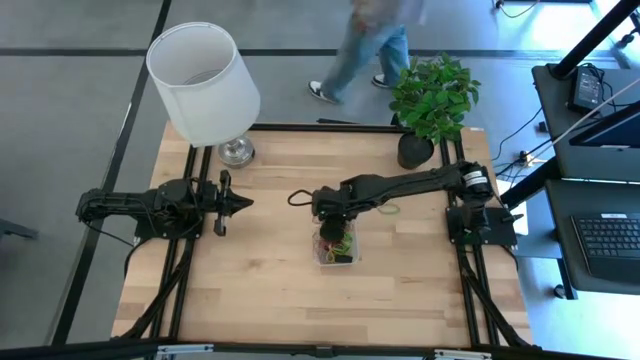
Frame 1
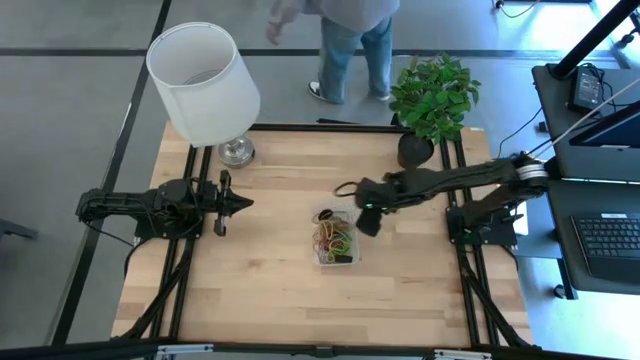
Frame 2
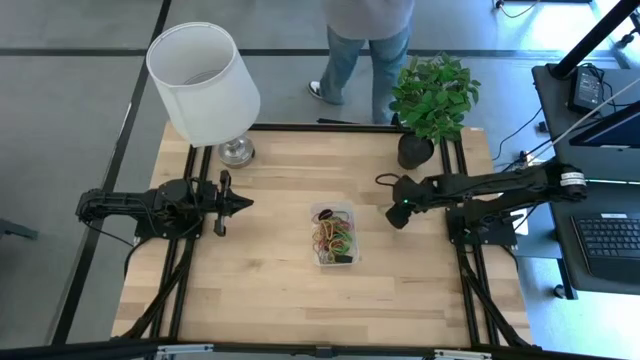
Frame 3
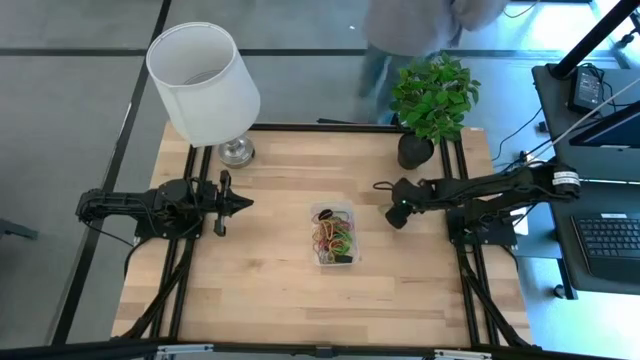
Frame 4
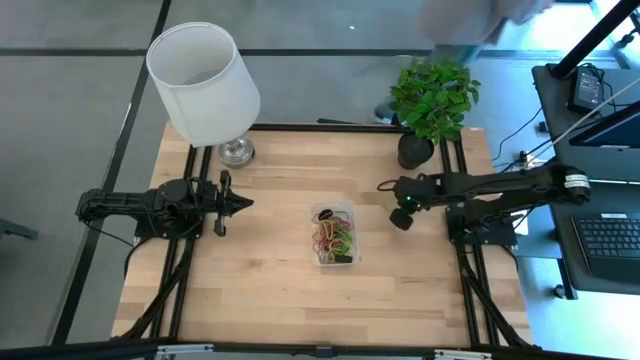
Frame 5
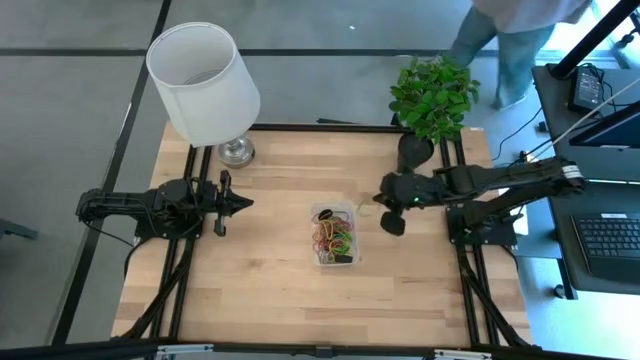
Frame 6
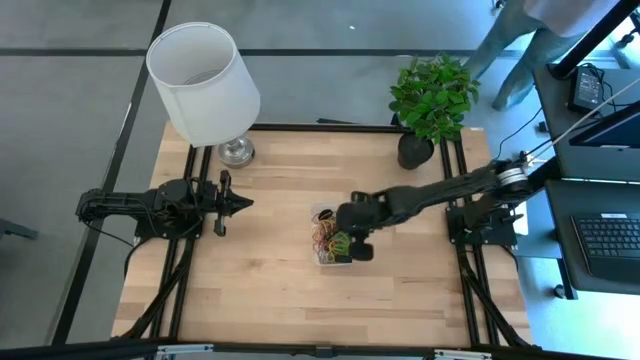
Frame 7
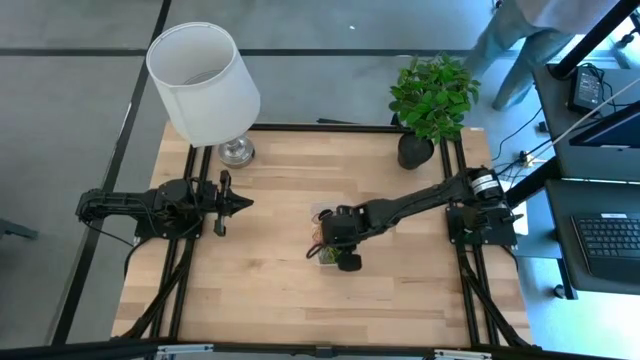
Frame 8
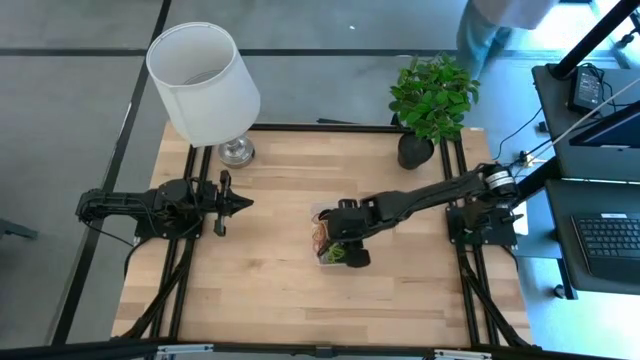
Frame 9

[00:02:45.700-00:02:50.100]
Task: Pick and place rubber bands into bin
Put the green rubber band into the bin

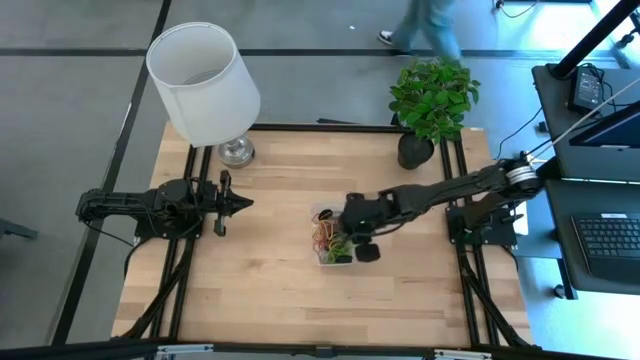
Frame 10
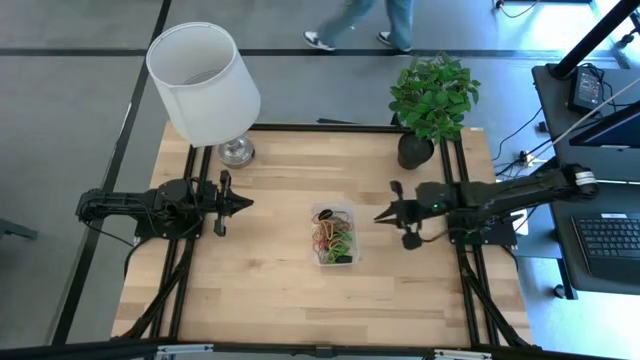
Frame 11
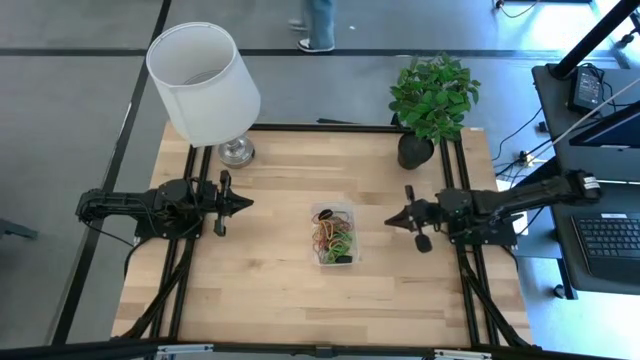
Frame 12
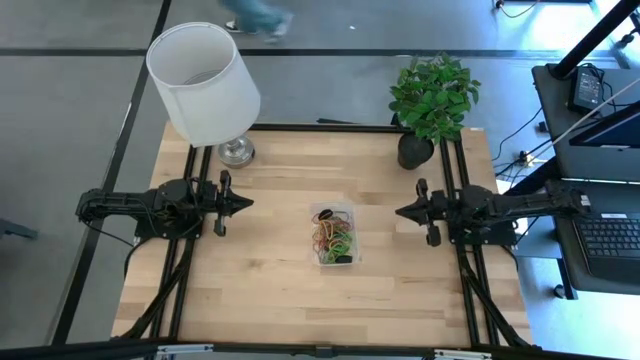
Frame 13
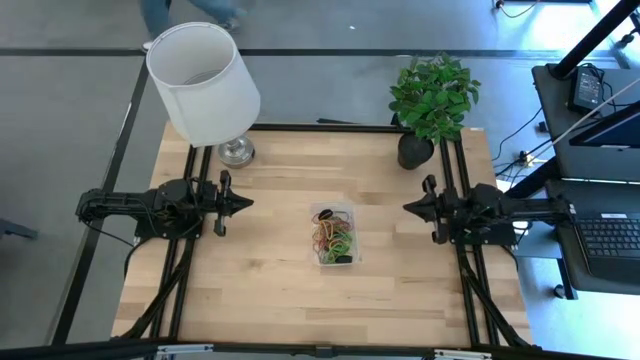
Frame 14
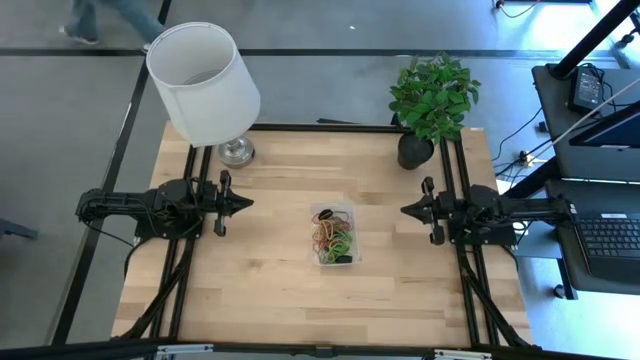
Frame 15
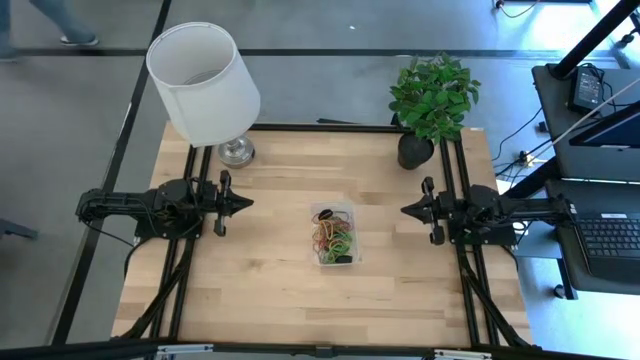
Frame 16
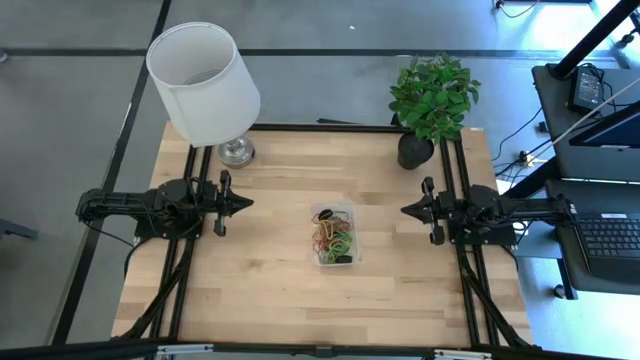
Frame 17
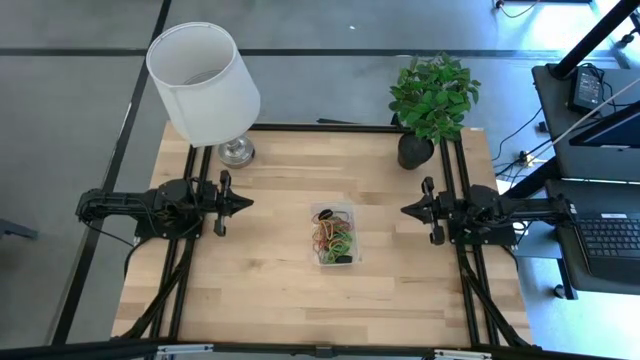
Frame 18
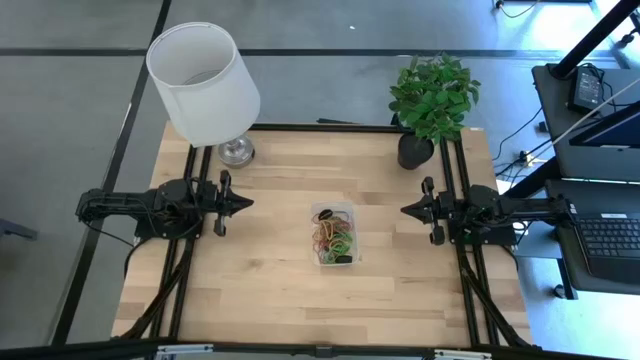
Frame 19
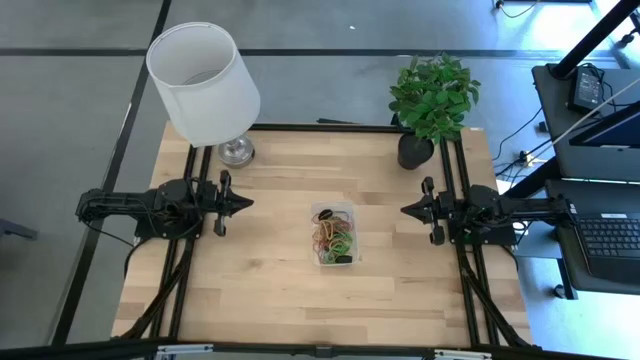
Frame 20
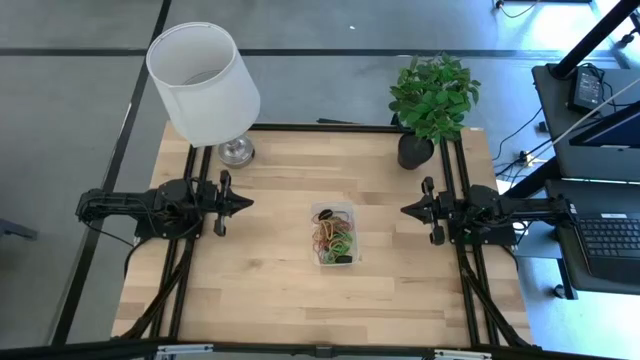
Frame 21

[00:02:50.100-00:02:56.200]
Return to Home Position

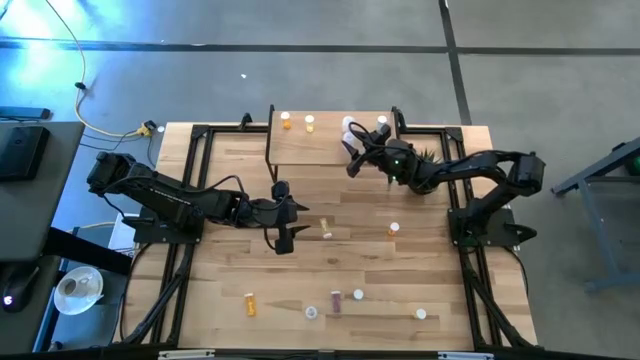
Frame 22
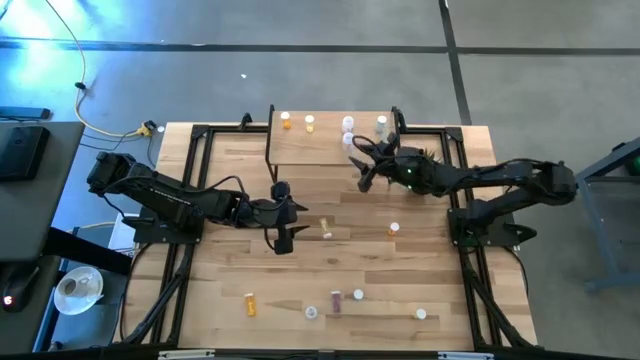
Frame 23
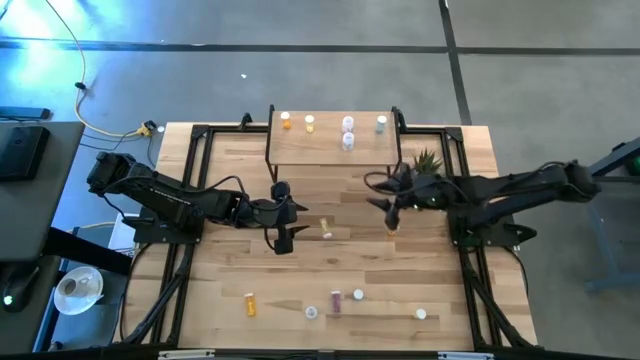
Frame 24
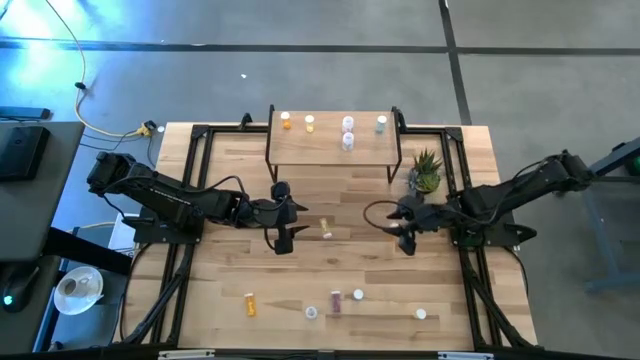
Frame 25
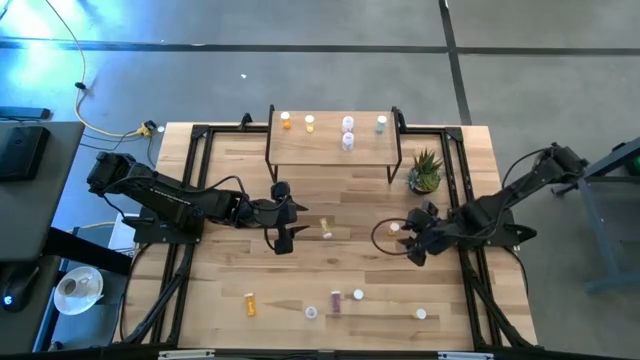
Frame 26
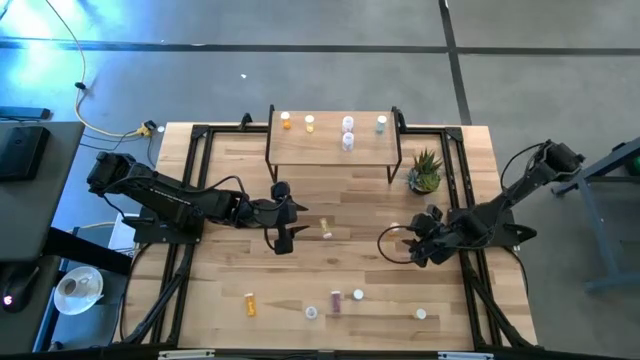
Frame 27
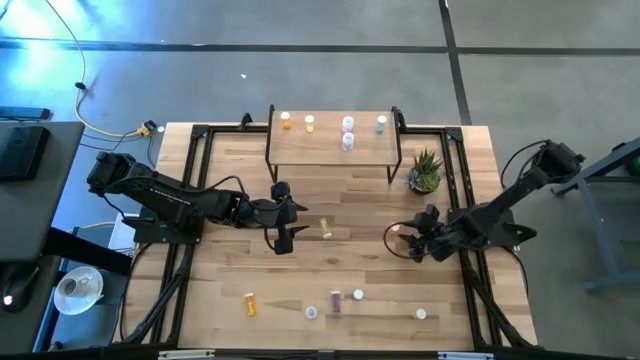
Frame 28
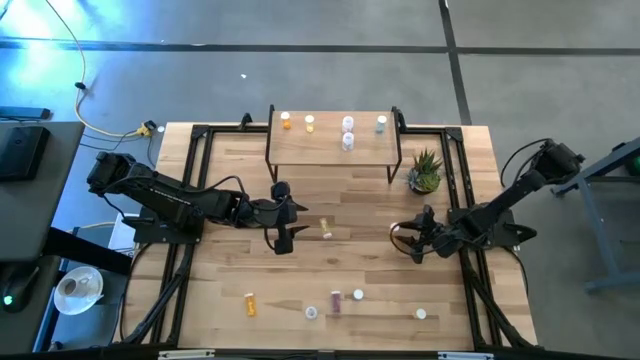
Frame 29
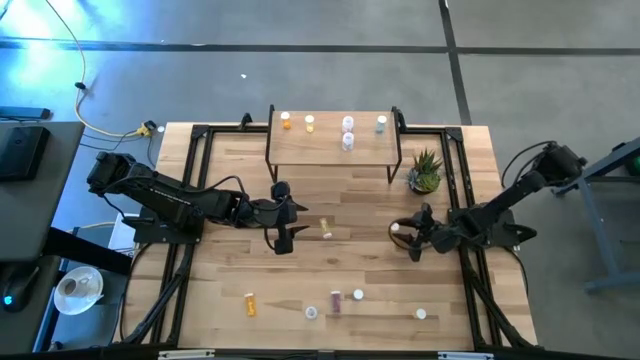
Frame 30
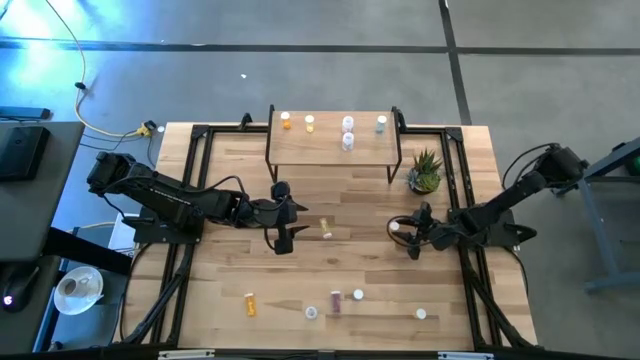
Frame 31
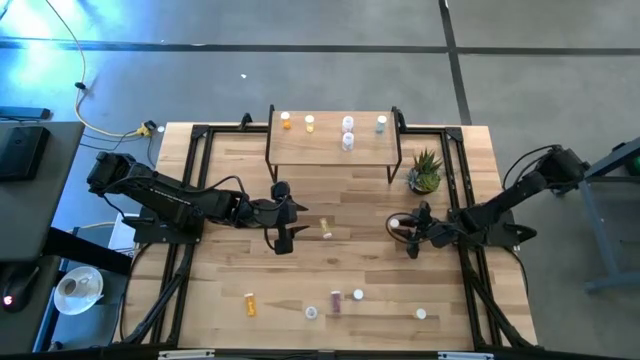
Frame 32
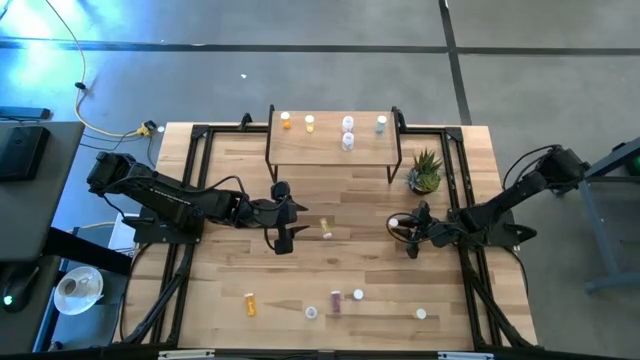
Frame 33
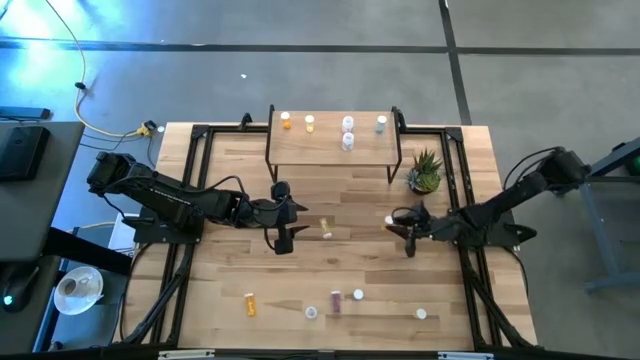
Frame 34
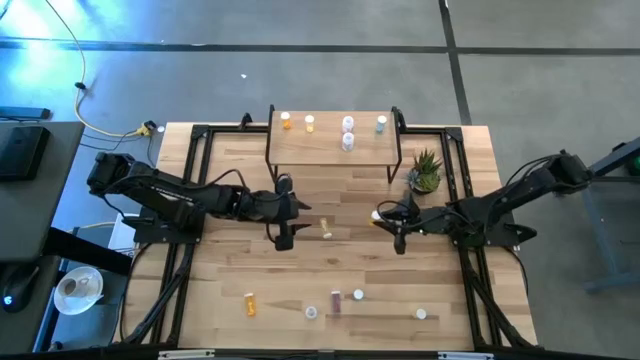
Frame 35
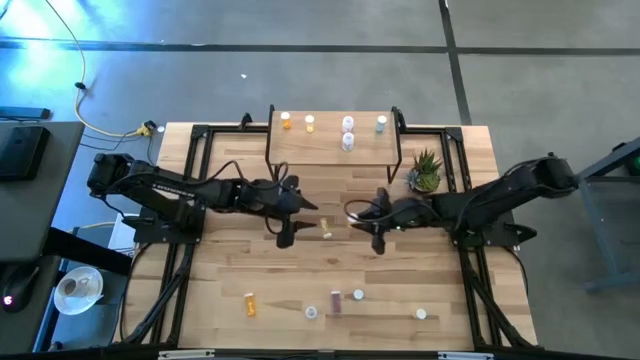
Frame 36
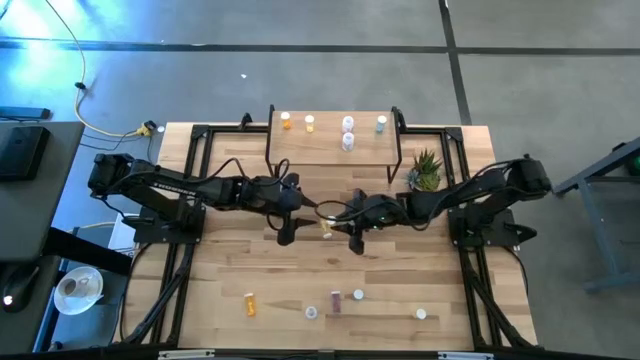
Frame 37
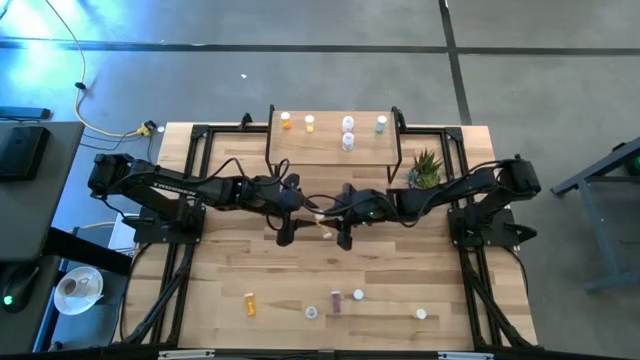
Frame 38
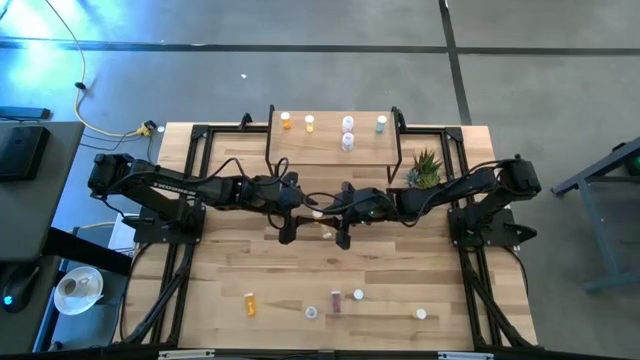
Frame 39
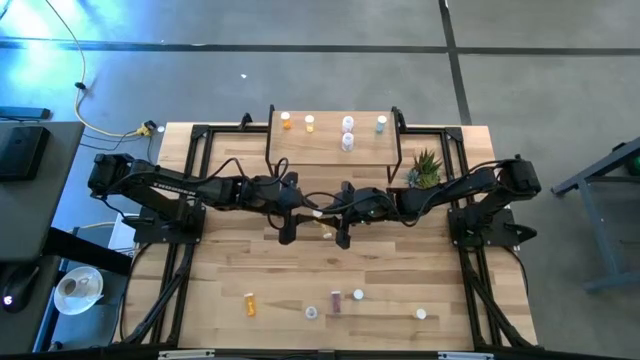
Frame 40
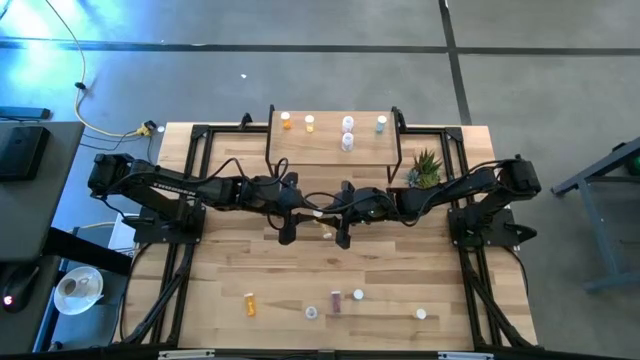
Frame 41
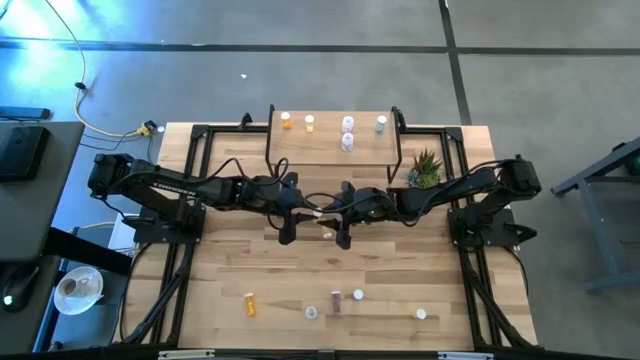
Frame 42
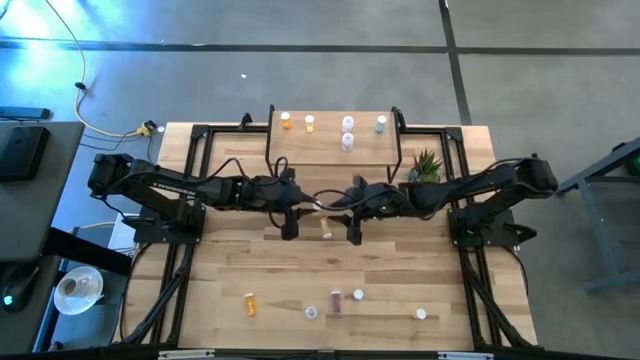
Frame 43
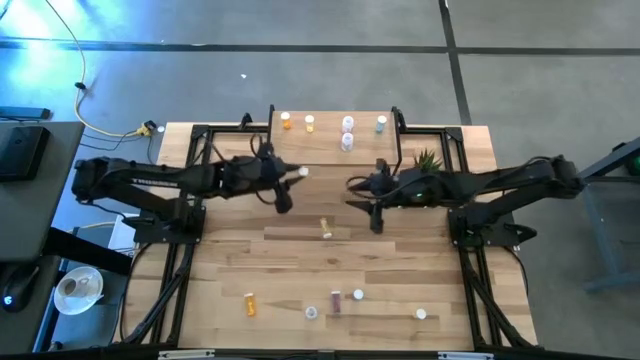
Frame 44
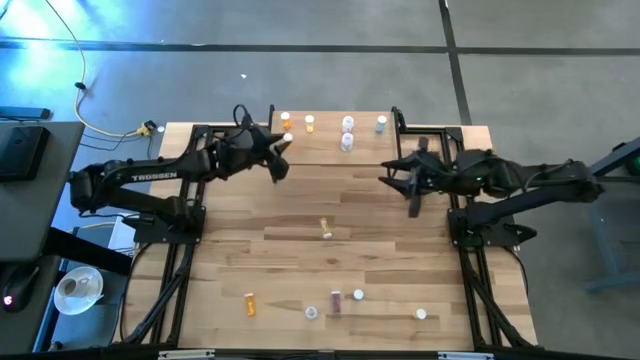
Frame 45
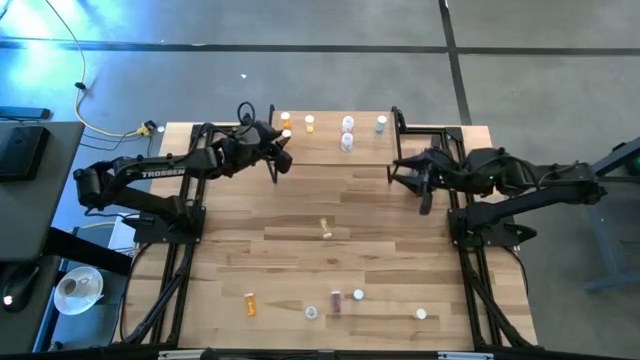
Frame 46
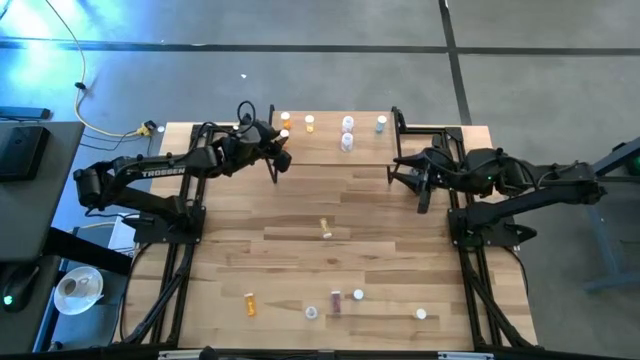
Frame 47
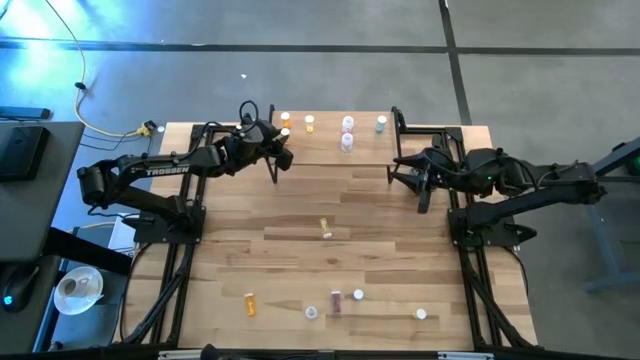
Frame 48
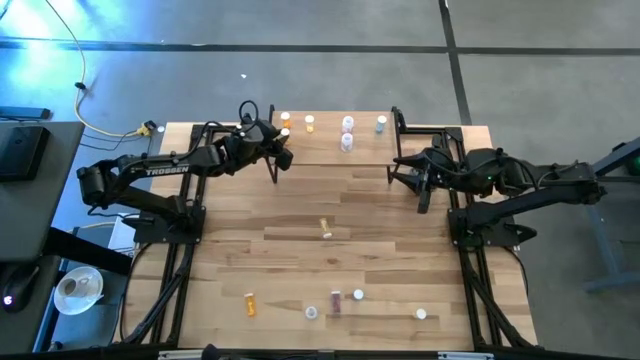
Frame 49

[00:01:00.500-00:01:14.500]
Task: Pick and place medicine bottles onto shelf by color
Put the top orange pill bottle on the shelf aligned with the other orange pill bottle
